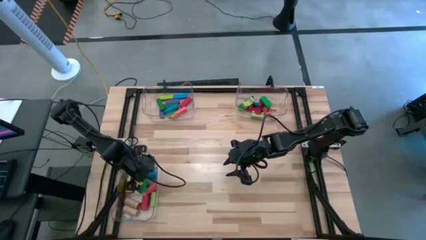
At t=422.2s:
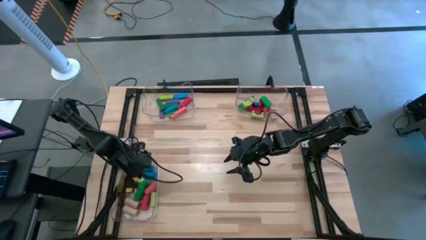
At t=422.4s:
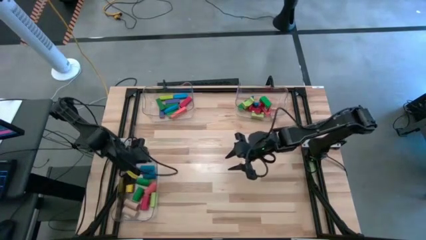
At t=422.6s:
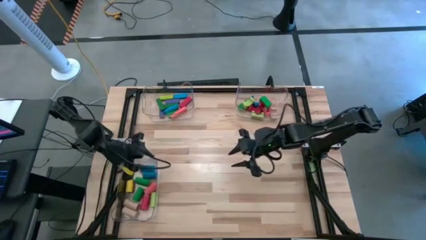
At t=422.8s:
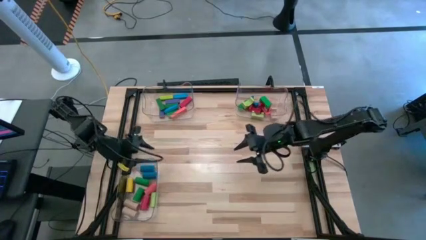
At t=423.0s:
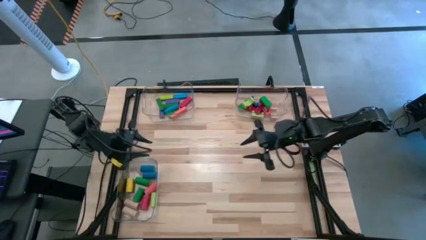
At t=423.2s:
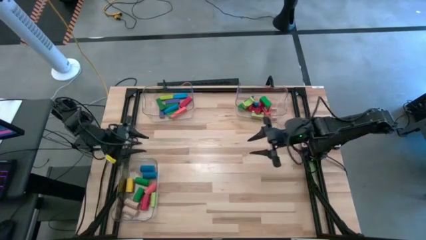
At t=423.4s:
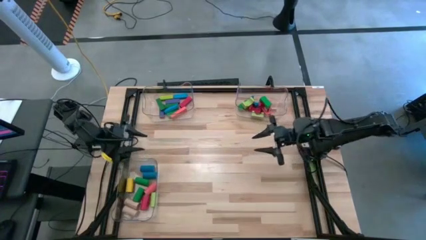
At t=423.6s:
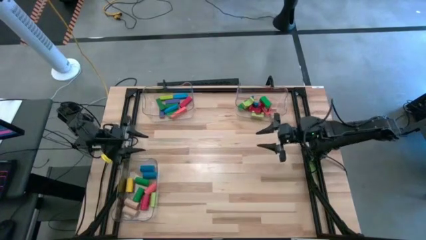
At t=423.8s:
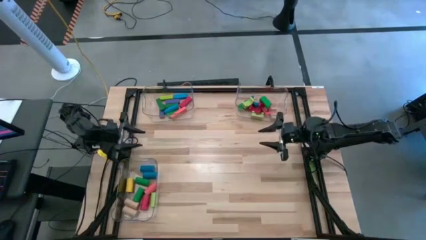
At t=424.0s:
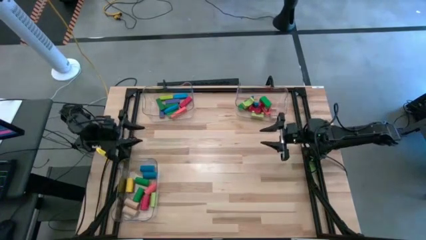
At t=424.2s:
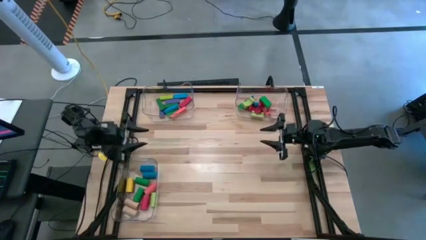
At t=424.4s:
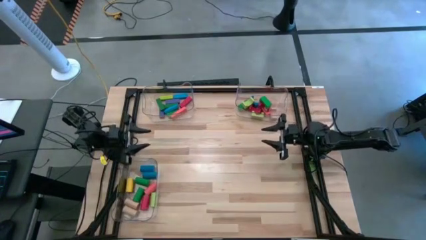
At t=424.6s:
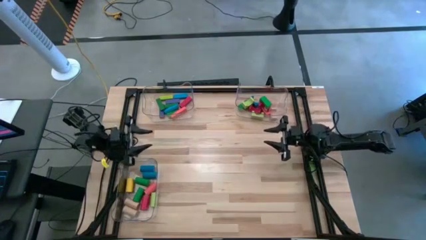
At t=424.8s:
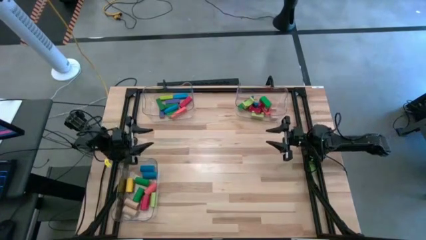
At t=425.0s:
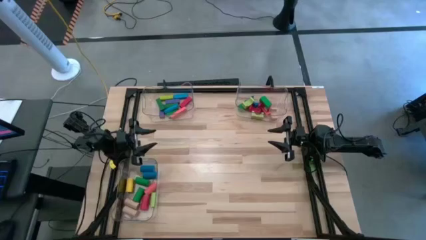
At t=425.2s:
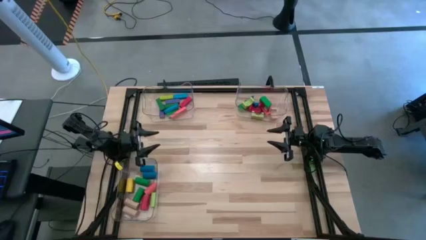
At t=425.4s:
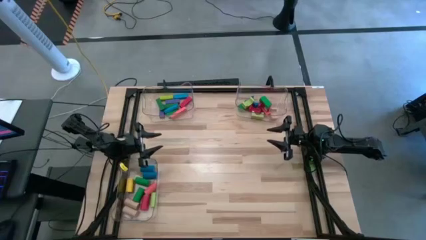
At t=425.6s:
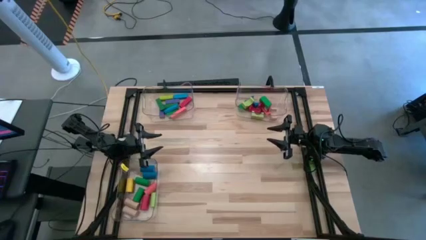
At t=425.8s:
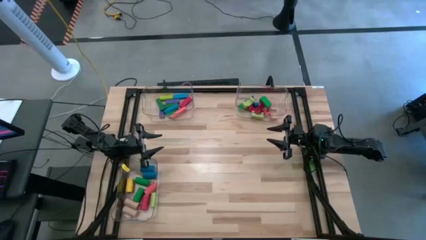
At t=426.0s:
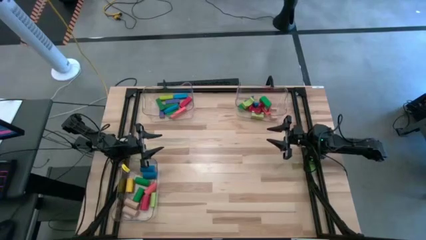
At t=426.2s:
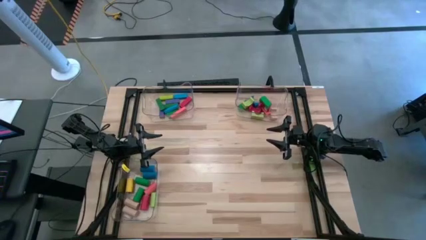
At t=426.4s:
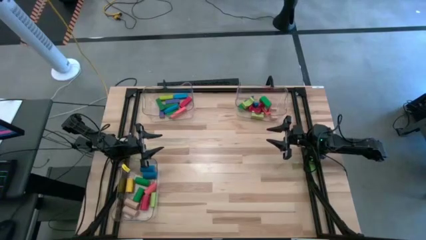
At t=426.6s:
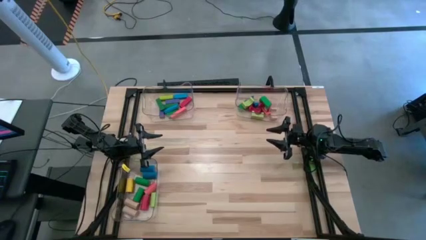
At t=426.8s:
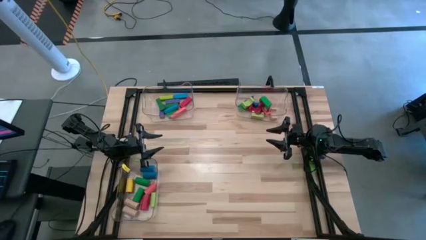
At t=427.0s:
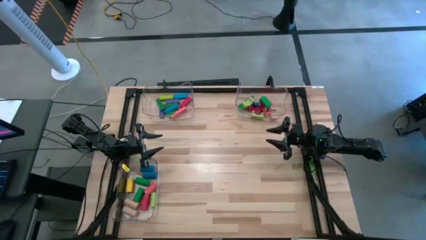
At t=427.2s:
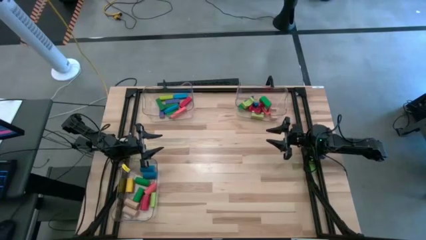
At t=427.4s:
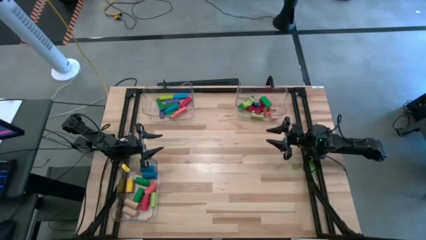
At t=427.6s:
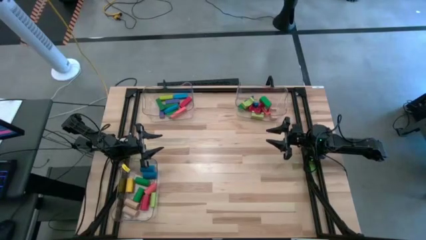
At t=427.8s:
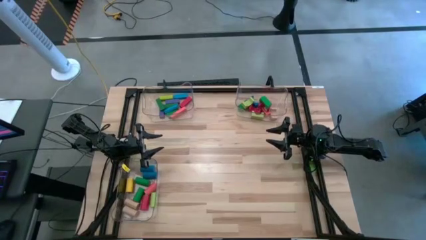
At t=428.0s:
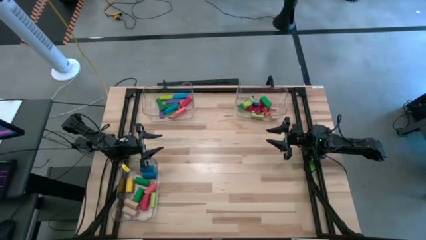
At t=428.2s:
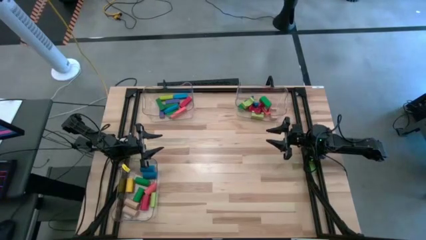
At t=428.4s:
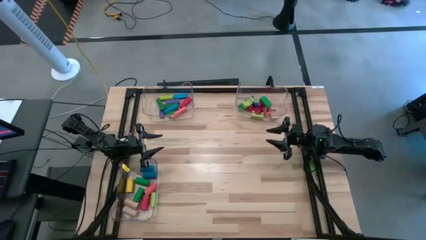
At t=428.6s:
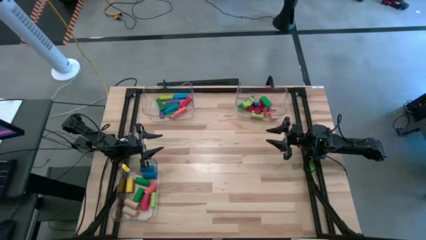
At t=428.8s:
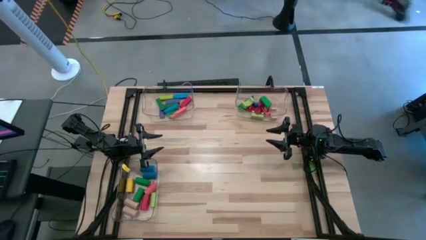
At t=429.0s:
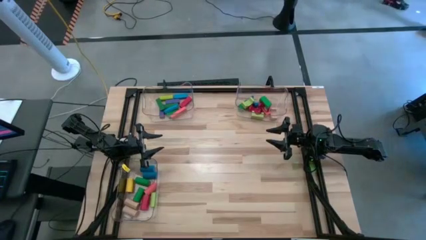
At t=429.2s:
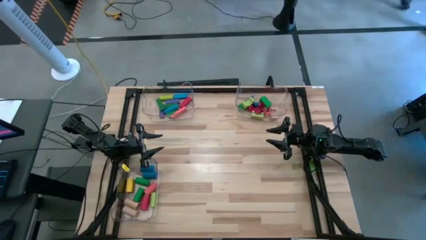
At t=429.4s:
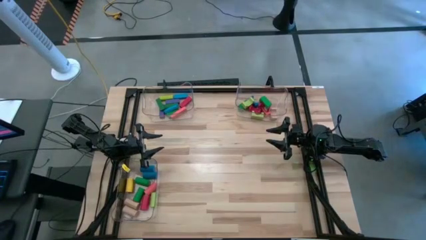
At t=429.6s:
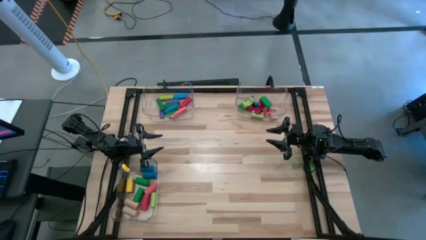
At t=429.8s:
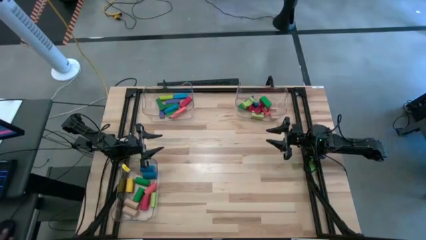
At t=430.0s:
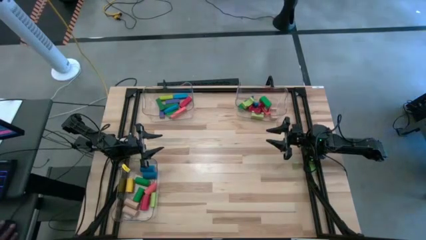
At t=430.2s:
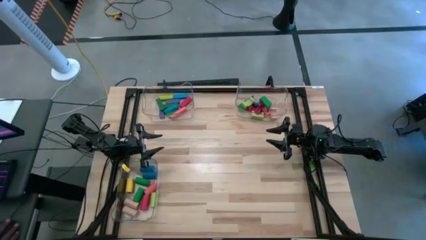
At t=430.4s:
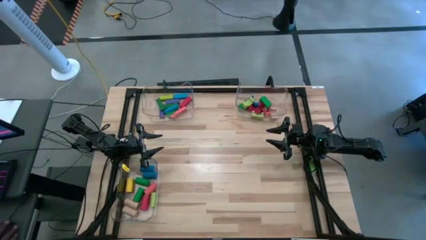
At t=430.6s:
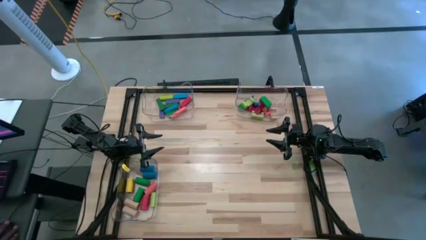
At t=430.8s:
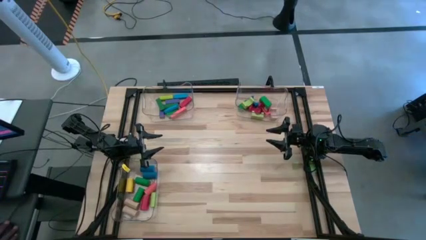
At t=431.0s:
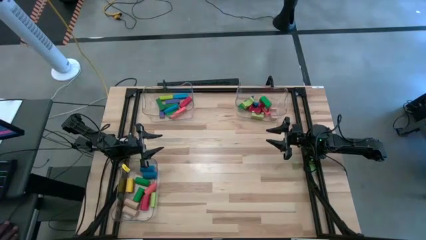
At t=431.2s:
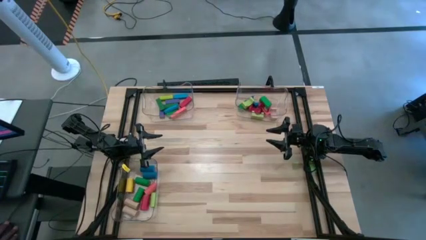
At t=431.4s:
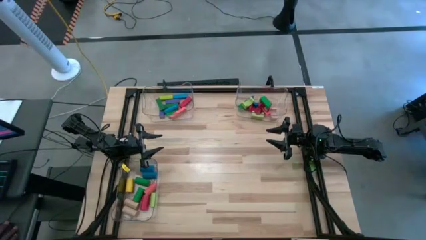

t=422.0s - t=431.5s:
Task: Sort blocks by size
Return to Home Position

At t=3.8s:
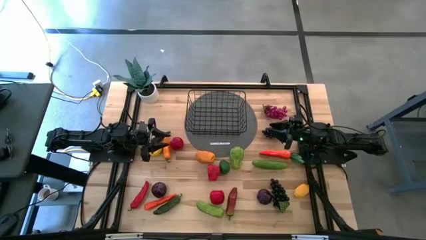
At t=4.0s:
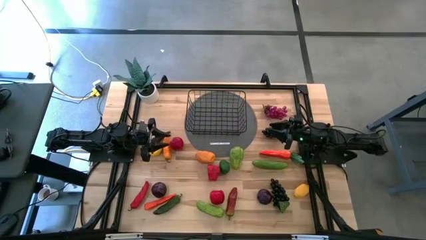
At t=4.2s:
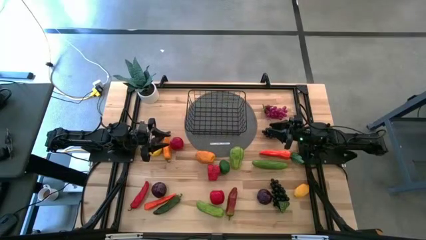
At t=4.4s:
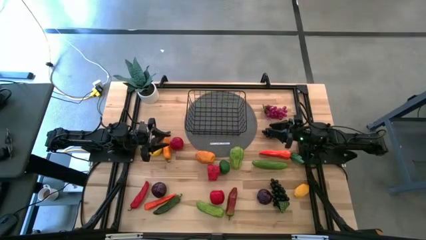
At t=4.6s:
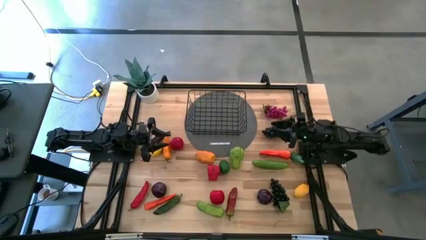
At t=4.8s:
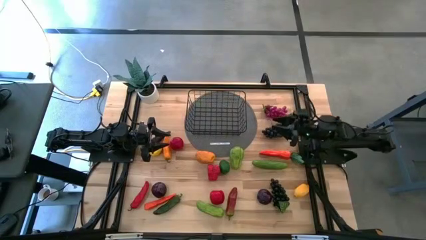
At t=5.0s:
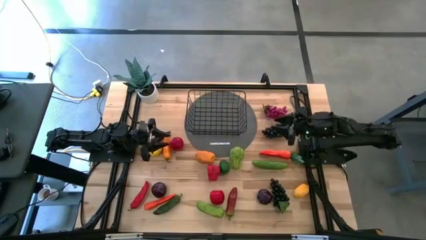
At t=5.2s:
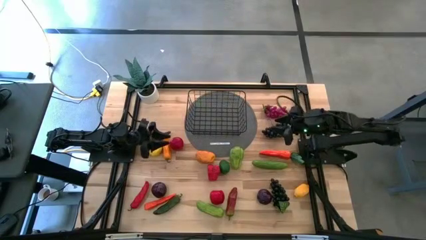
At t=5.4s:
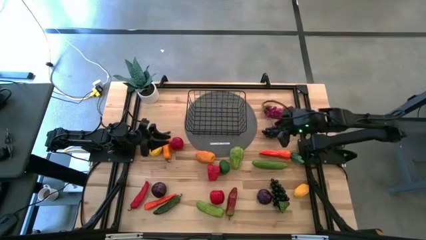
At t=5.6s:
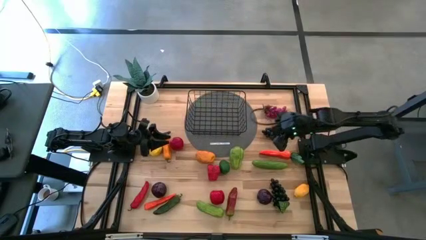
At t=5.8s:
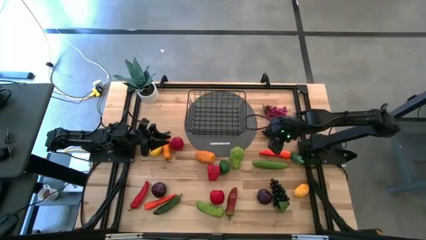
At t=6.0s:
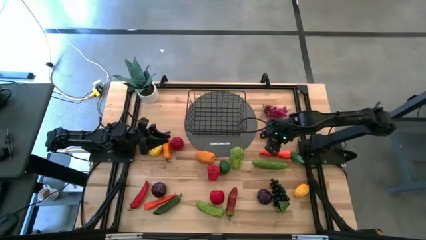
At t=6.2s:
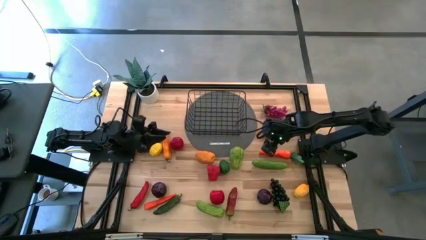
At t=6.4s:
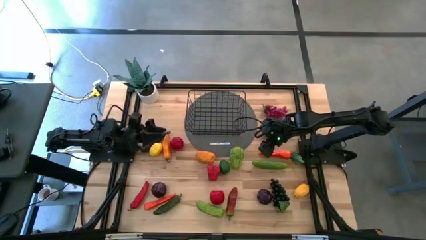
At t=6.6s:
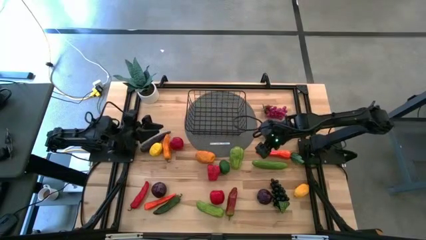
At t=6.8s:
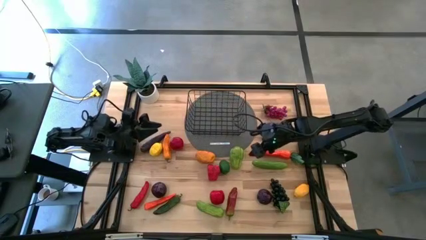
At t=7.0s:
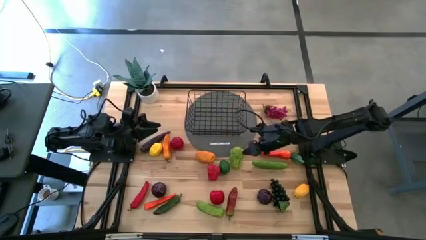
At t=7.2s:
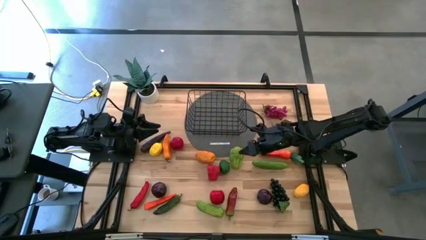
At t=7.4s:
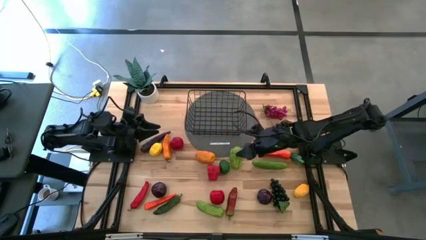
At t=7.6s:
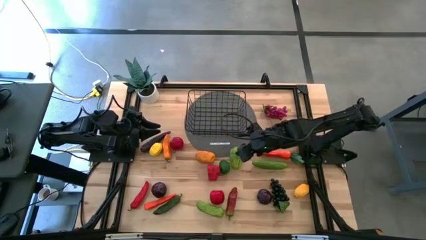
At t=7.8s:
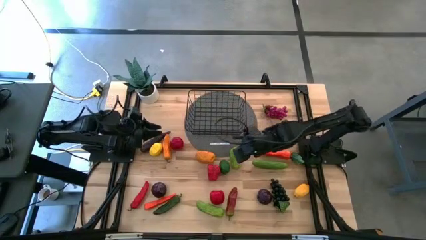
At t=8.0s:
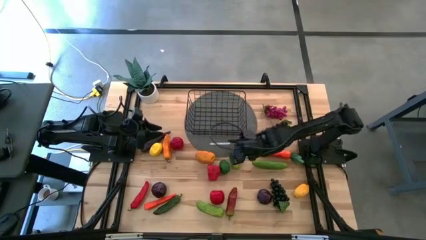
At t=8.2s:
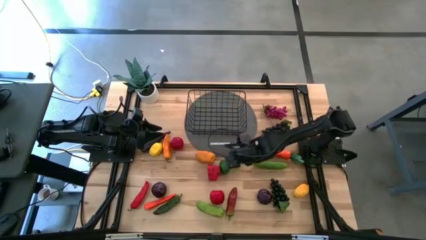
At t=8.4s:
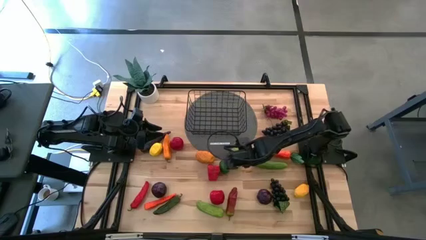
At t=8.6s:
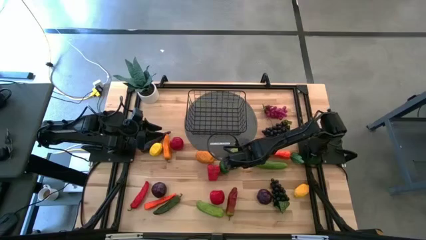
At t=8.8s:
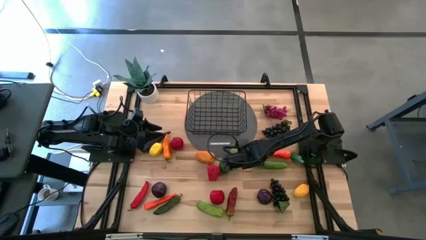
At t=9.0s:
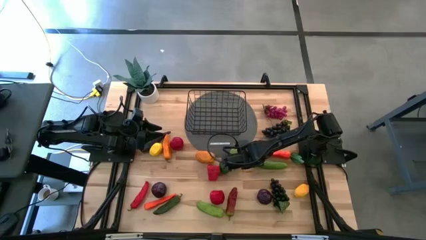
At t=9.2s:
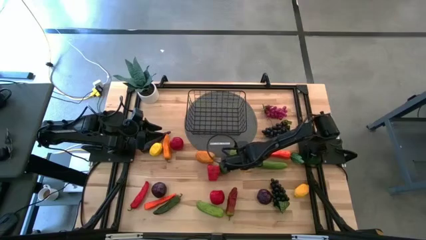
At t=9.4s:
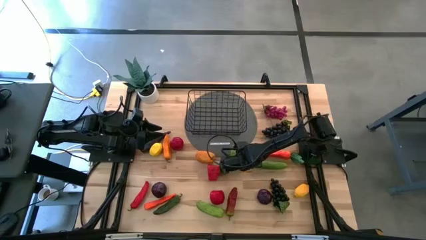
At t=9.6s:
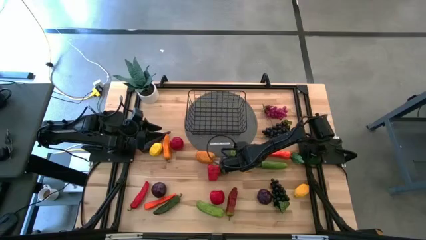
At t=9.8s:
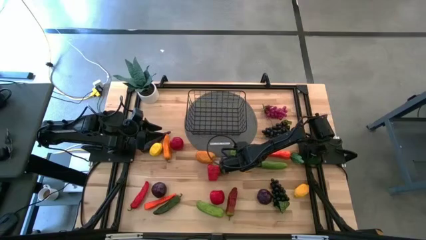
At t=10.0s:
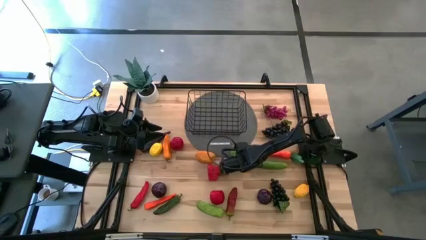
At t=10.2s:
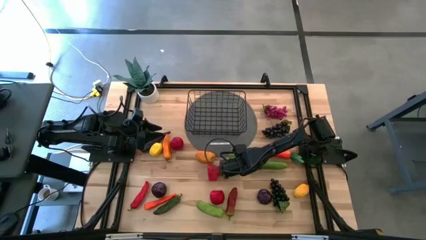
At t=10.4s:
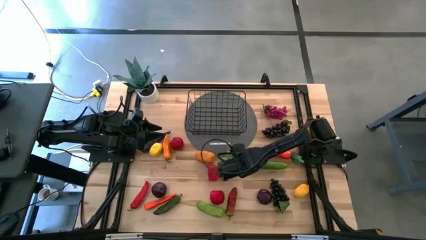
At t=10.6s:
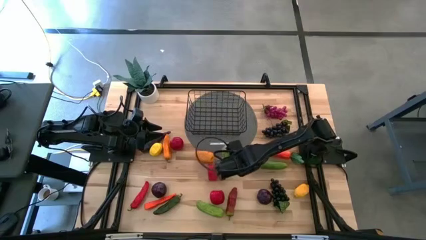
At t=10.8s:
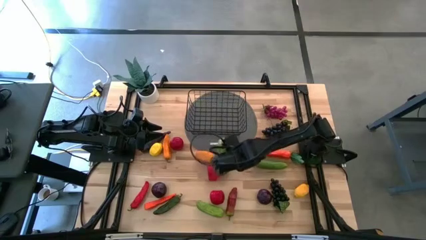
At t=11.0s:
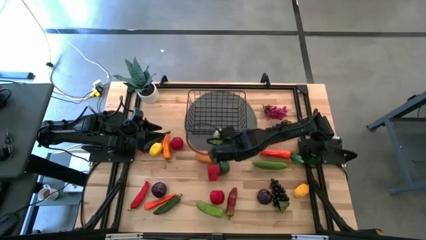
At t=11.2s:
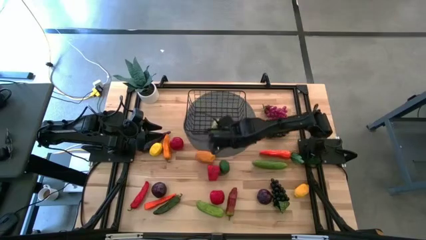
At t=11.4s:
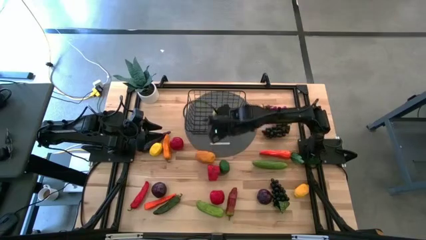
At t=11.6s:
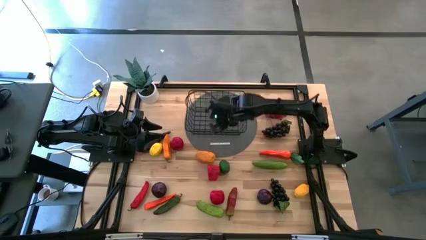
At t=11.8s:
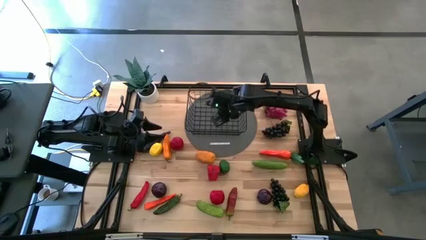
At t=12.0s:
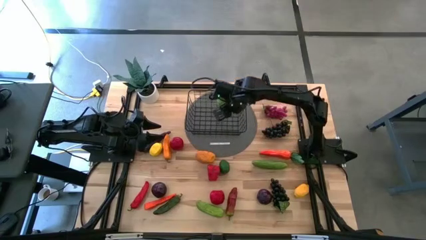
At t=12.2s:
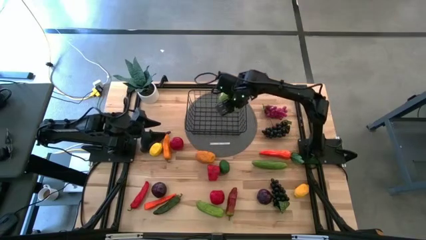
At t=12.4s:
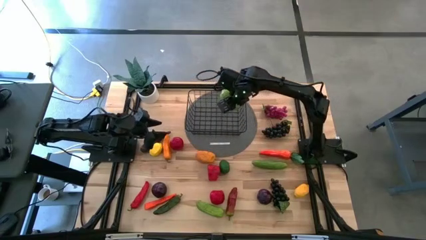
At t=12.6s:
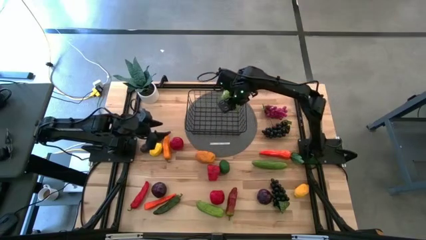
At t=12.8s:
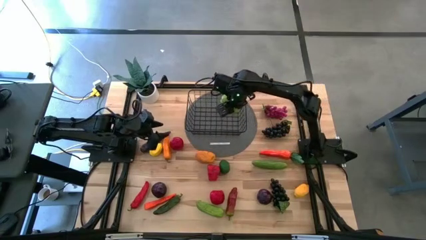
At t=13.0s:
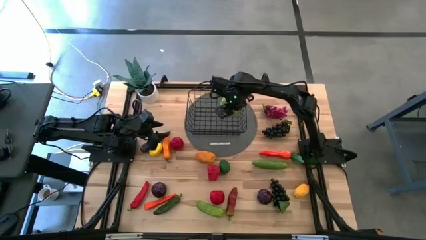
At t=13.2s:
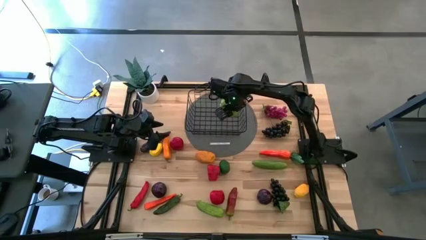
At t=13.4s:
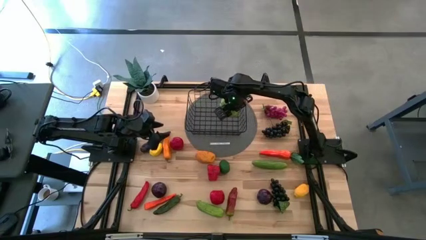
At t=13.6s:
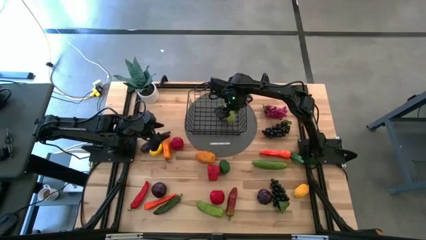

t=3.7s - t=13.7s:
Task: Build produce basket
Put the chayote into the wire basket
